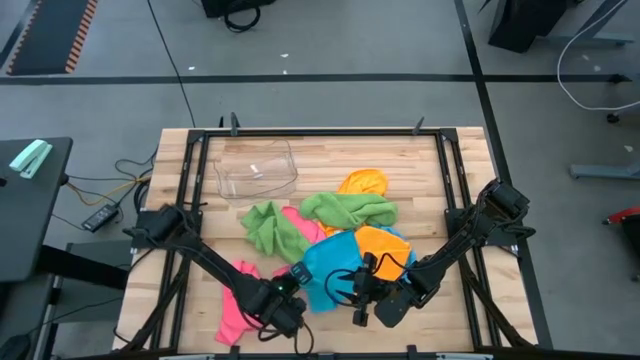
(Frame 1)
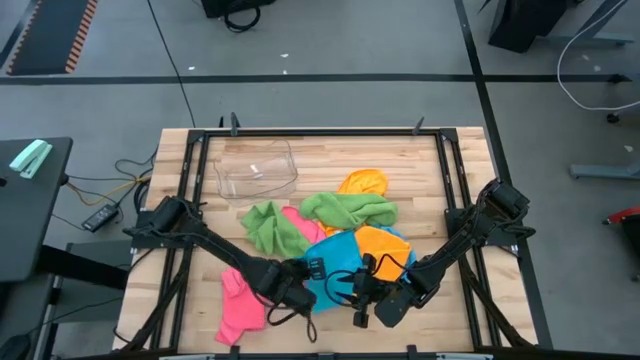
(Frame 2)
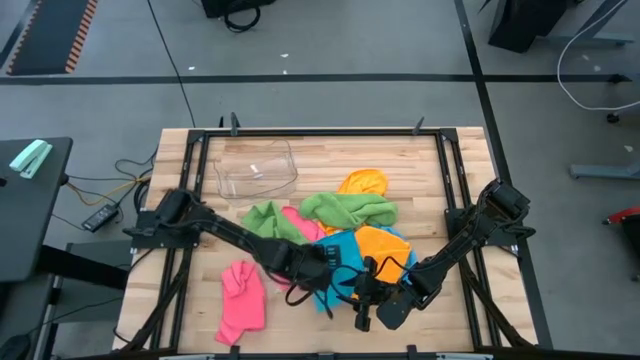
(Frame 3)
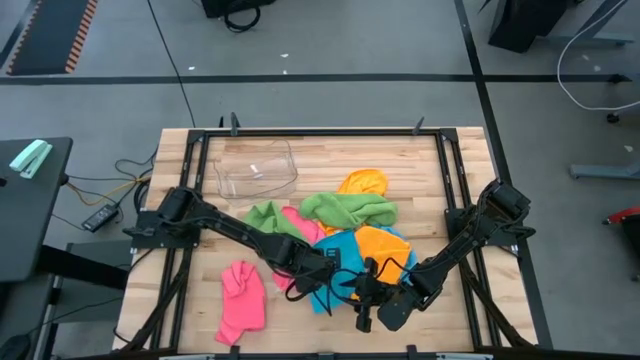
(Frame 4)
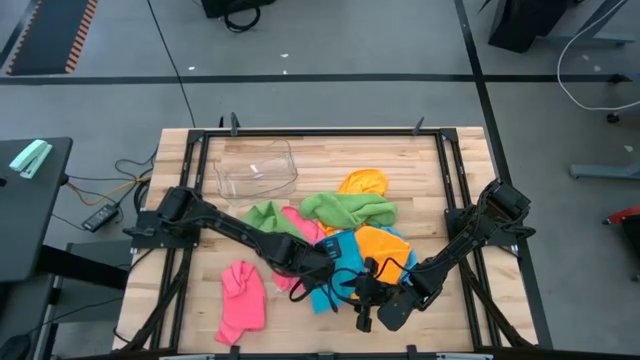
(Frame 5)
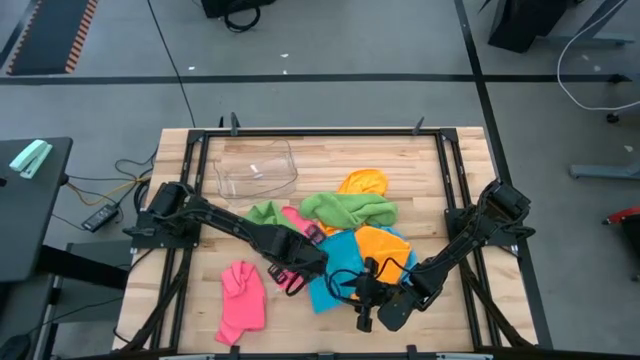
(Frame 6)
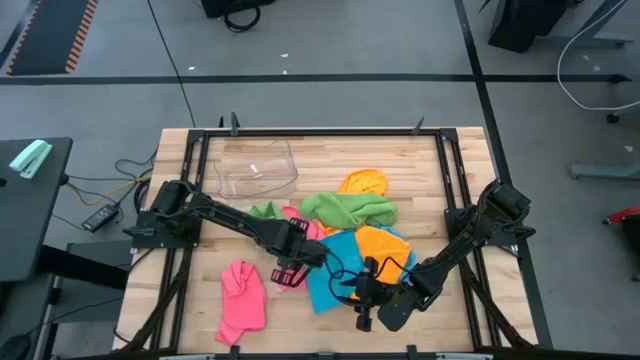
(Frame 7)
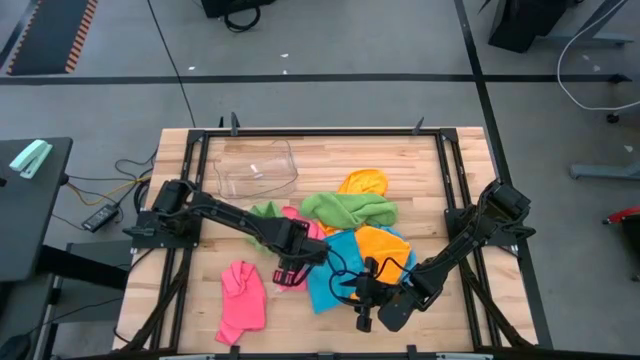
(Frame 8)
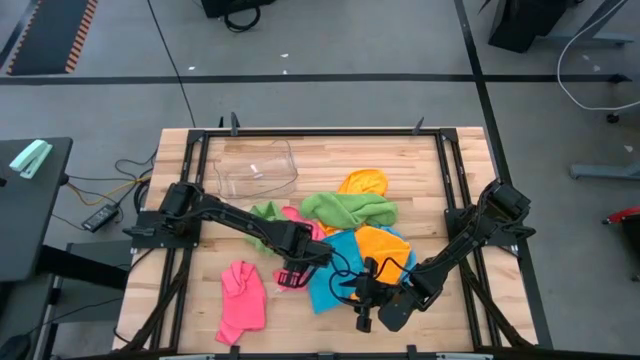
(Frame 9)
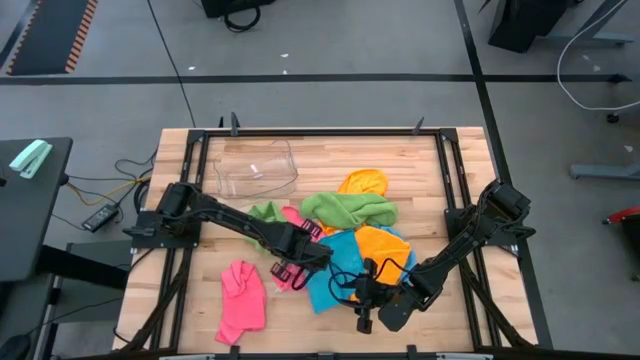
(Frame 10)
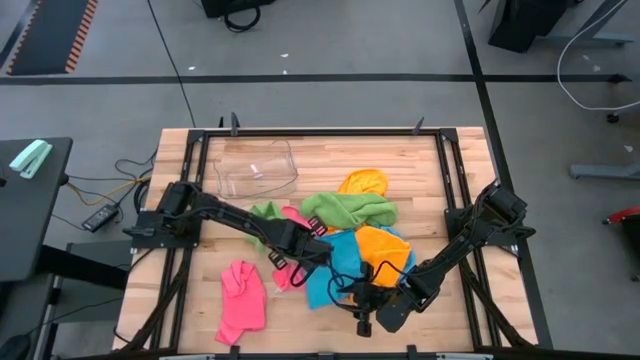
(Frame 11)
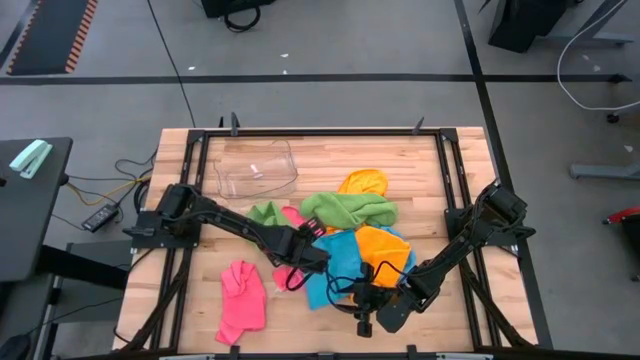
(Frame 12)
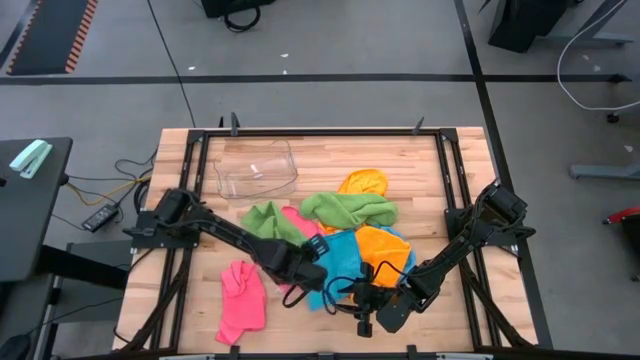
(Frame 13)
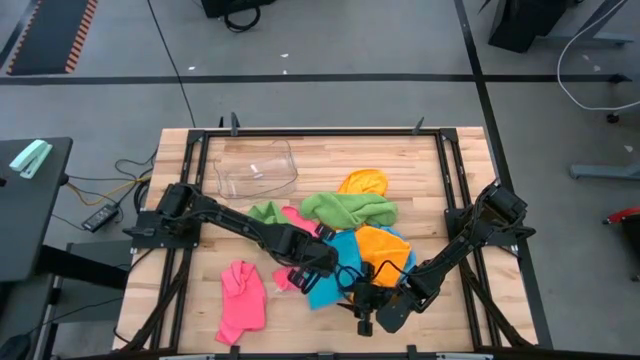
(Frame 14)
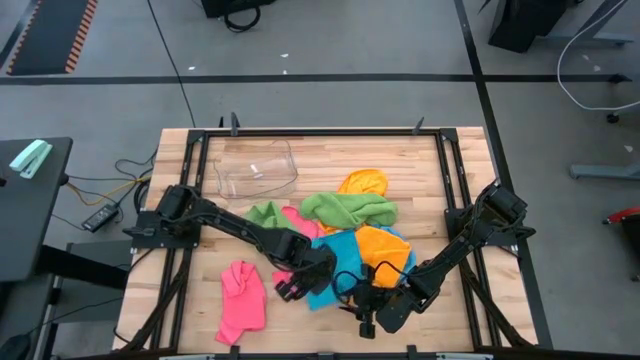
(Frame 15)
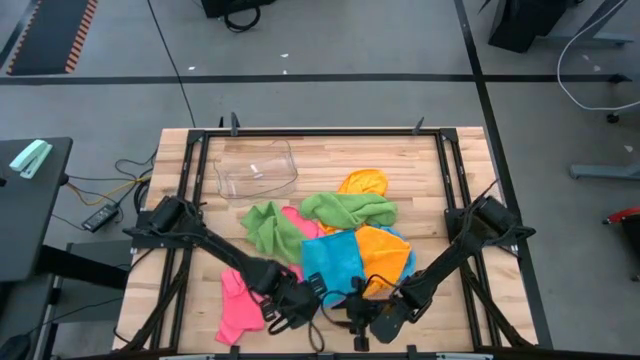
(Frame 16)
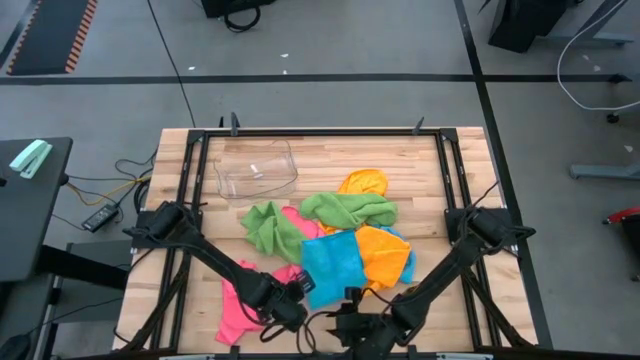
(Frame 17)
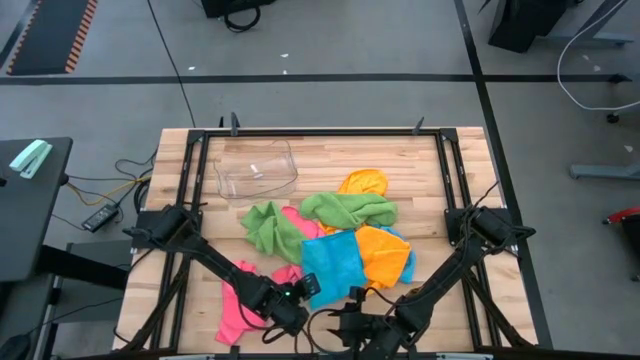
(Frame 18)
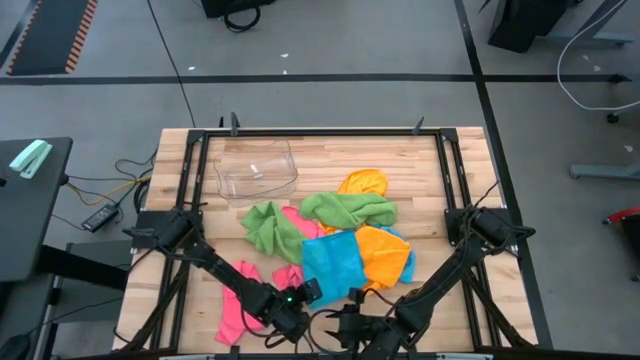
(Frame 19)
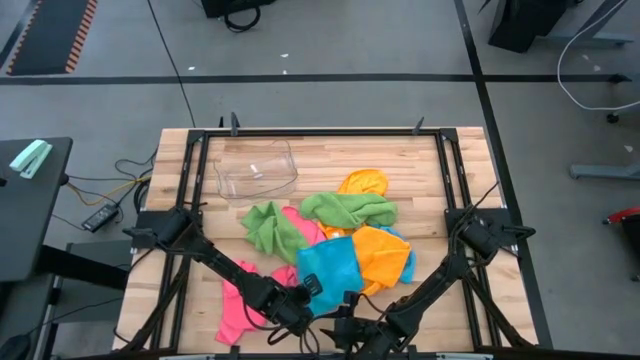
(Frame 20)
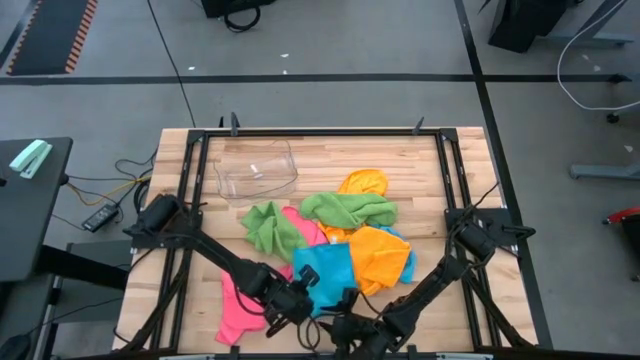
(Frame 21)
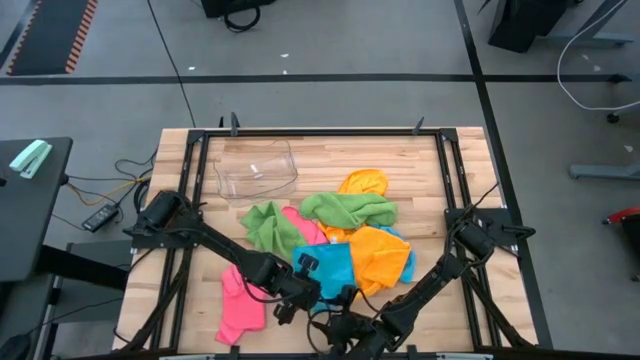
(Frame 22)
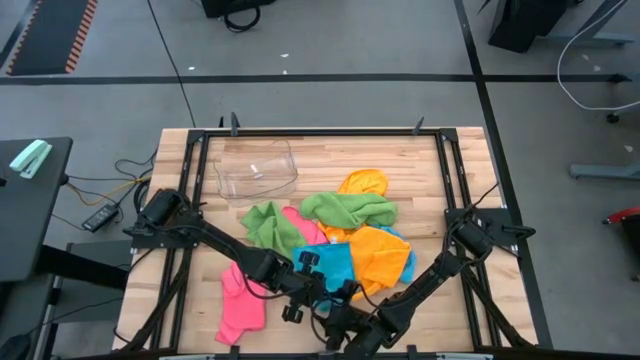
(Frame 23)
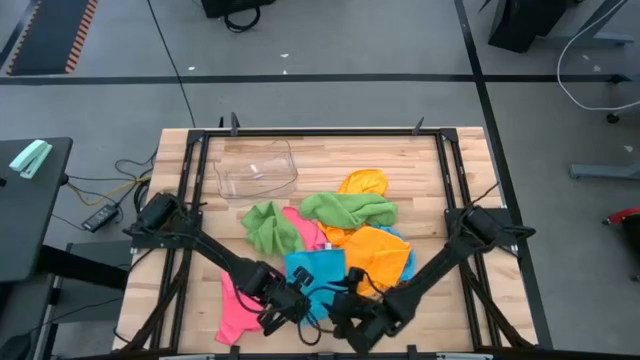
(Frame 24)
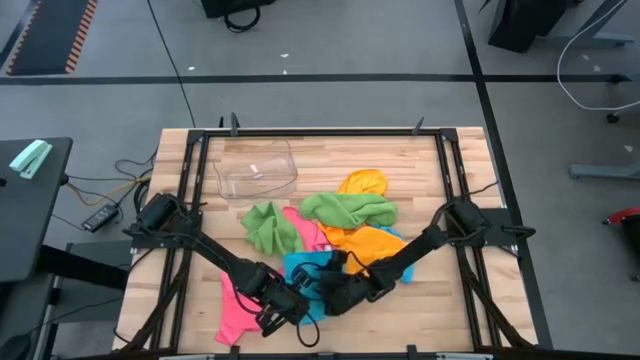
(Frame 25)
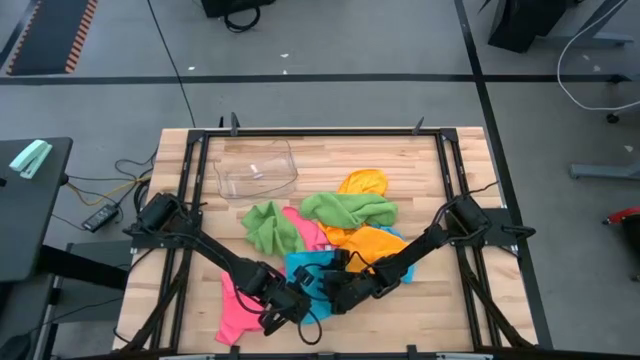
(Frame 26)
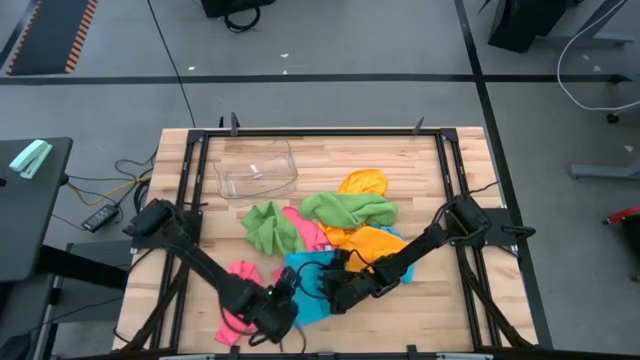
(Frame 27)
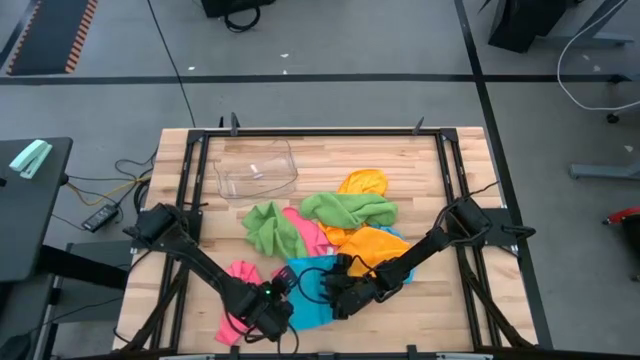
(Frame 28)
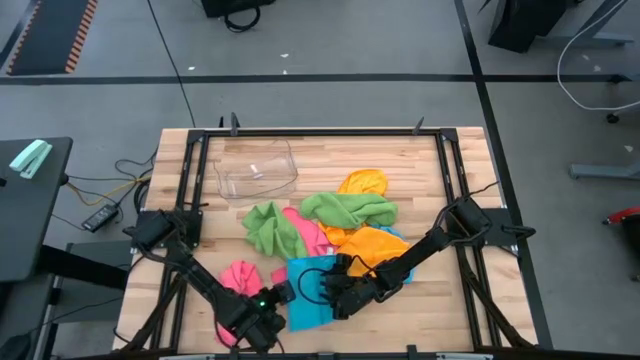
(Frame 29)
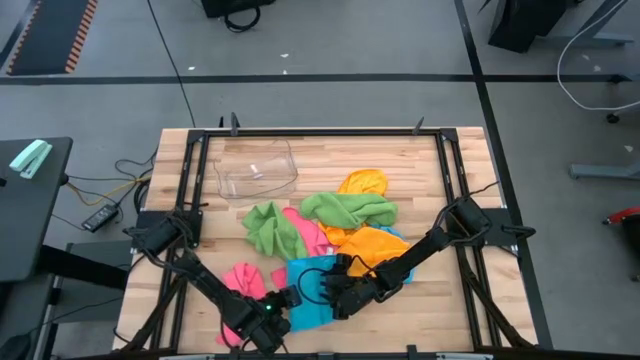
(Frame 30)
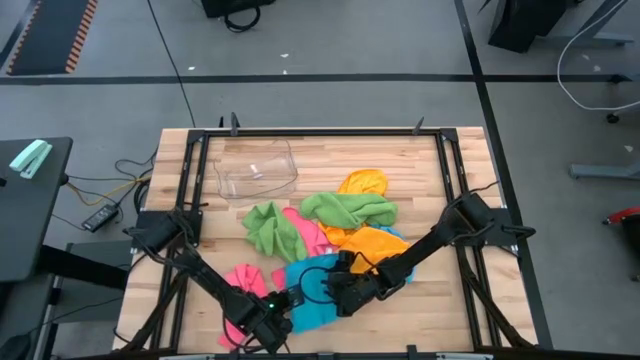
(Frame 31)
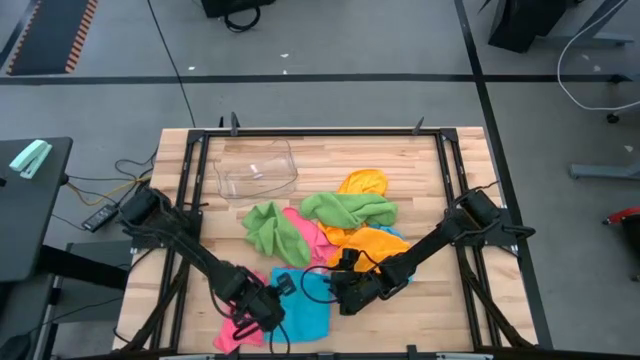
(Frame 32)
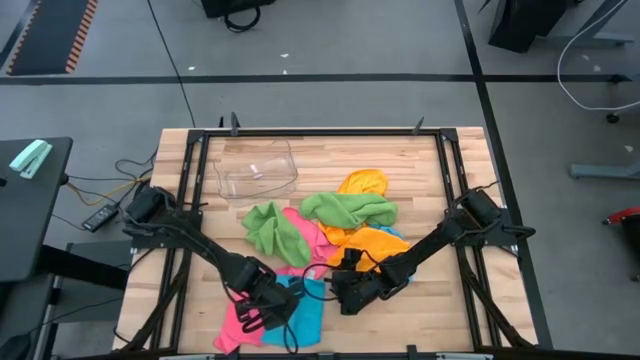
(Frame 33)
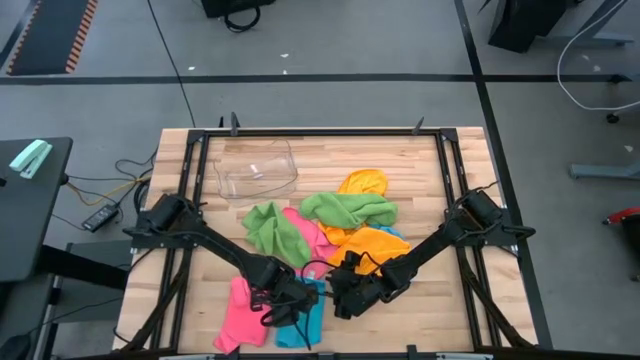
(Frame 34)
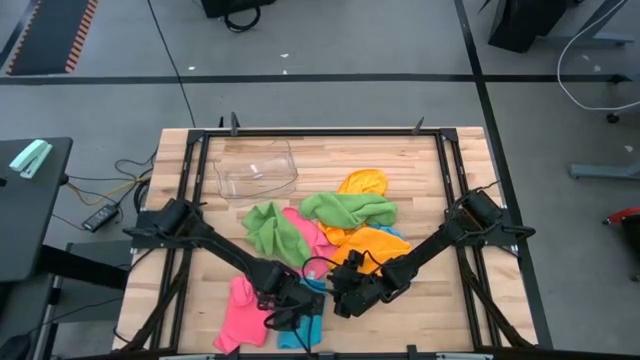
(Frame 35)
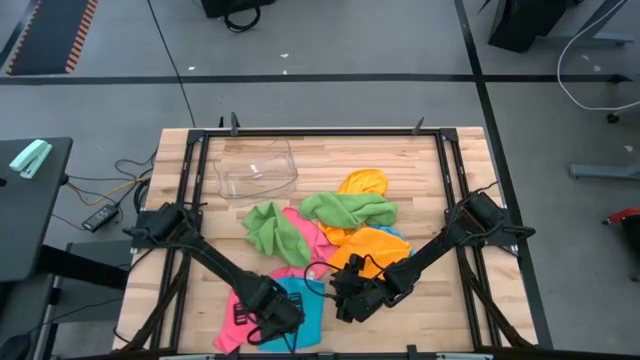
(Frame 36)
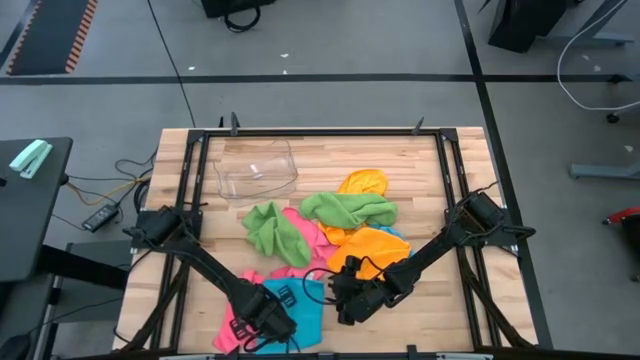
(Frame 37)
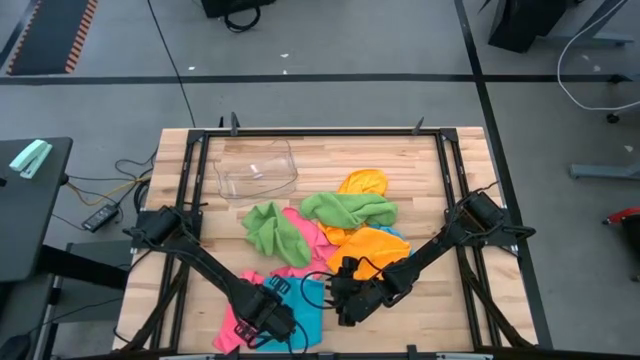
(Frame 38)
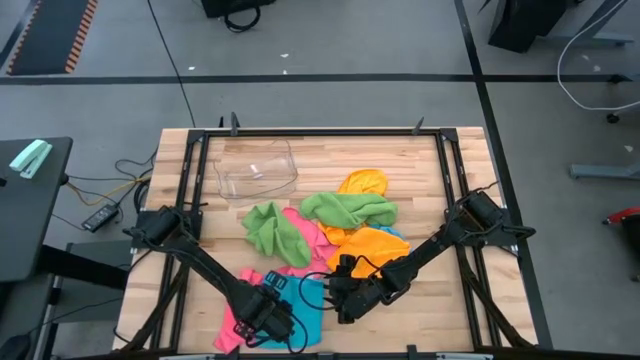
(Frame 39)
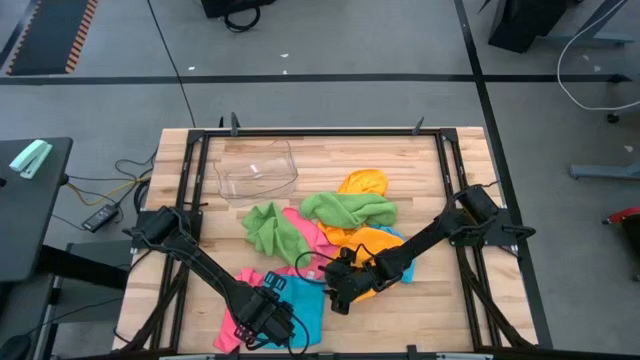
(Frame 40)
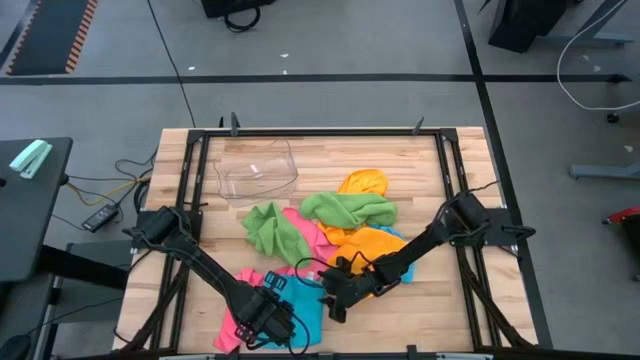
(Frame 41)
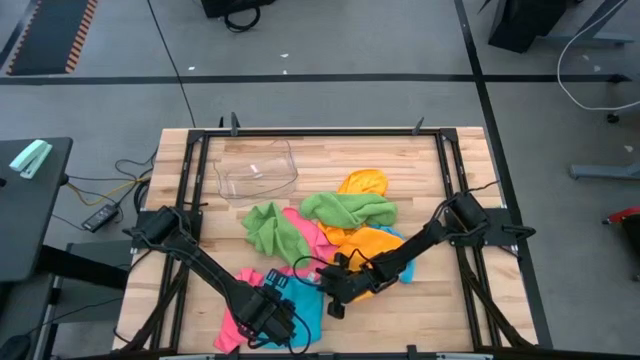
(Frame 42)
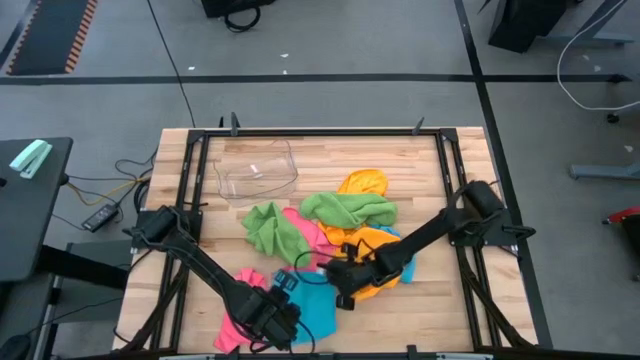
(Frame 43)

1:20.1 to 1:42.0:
Task: Fold microfiber towels
Fold the left blue microfiber towel
